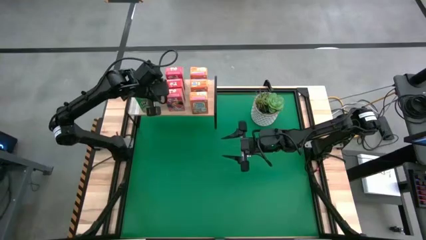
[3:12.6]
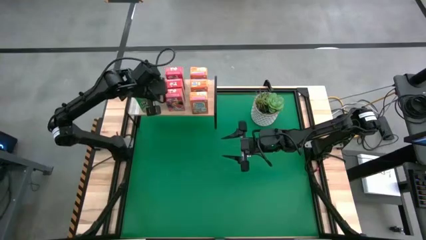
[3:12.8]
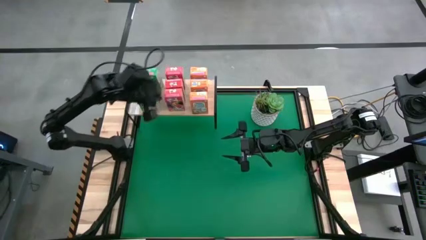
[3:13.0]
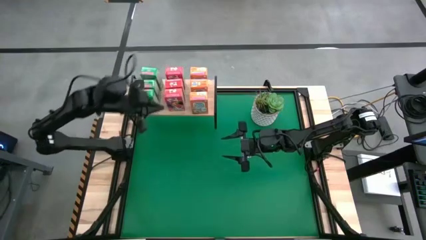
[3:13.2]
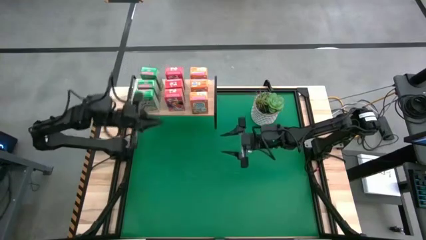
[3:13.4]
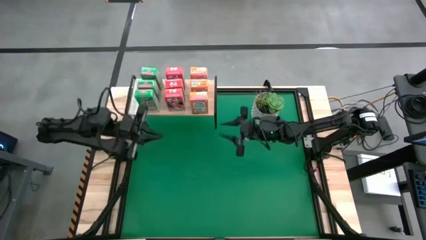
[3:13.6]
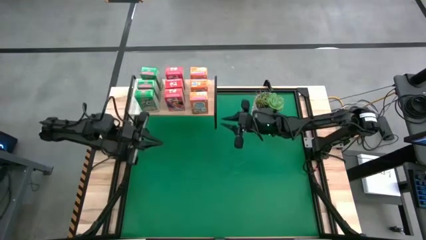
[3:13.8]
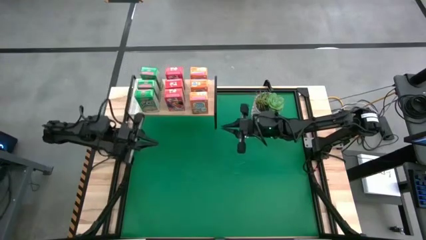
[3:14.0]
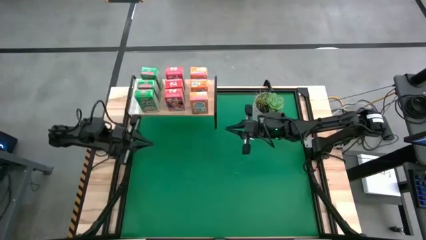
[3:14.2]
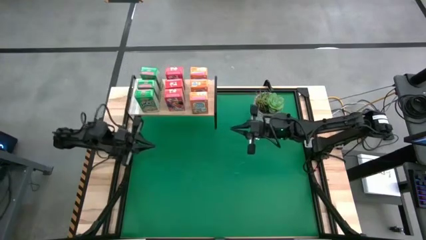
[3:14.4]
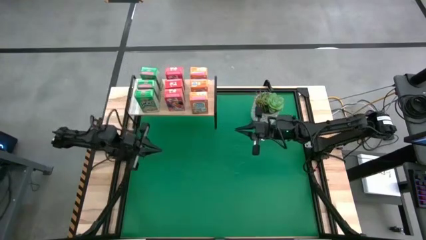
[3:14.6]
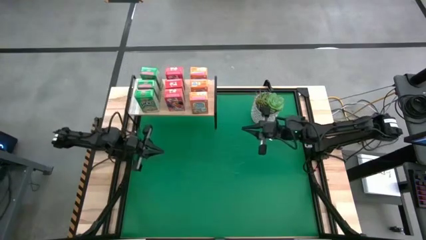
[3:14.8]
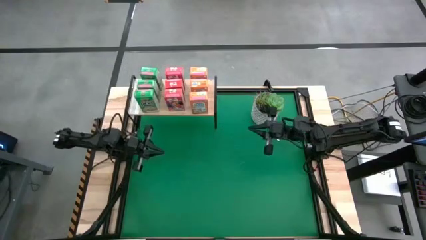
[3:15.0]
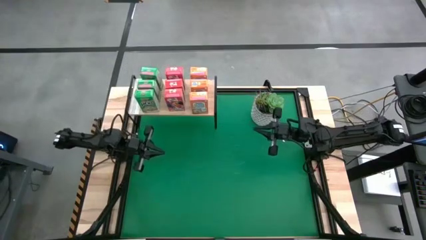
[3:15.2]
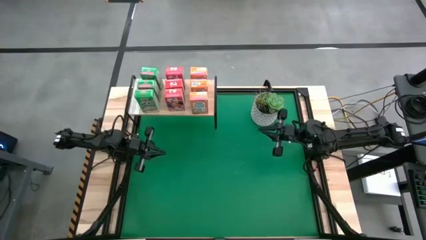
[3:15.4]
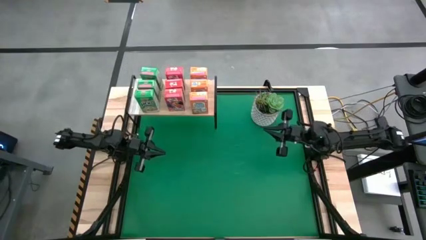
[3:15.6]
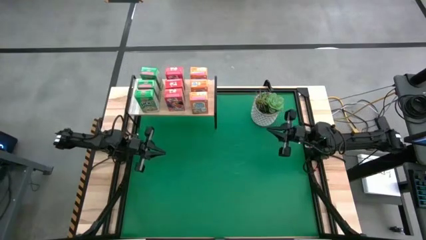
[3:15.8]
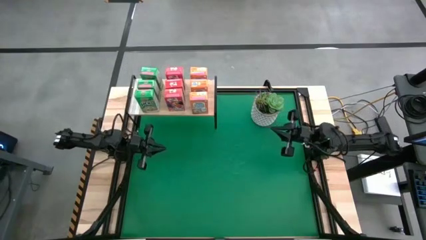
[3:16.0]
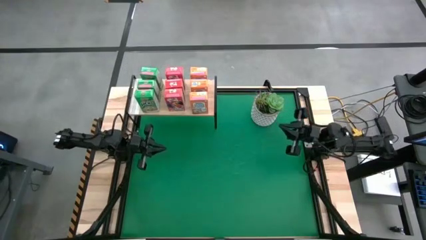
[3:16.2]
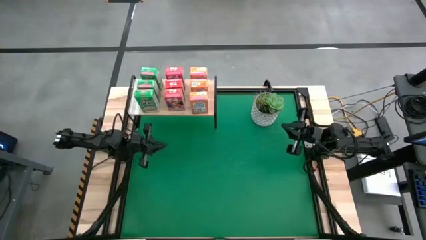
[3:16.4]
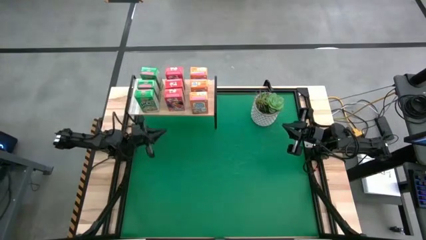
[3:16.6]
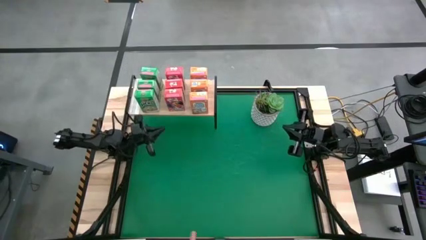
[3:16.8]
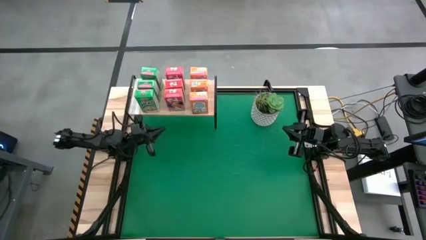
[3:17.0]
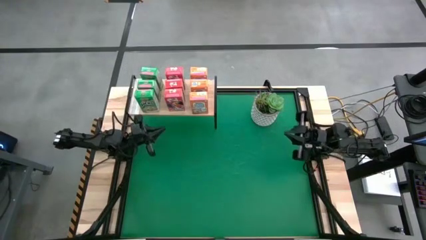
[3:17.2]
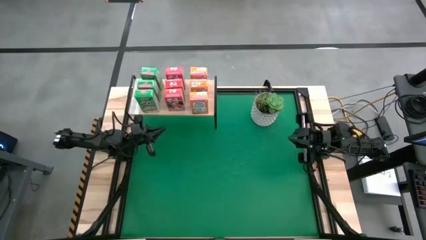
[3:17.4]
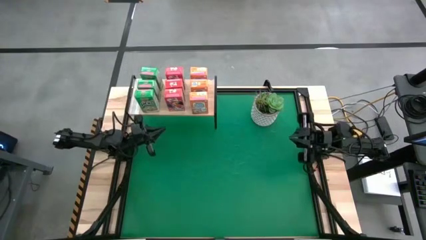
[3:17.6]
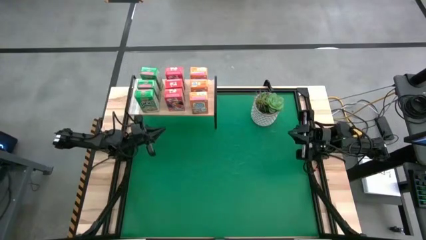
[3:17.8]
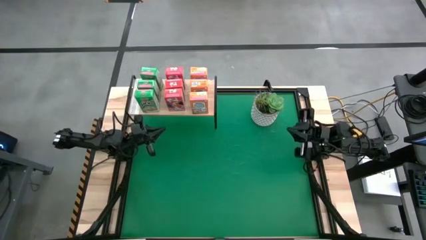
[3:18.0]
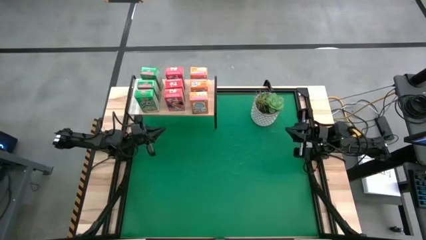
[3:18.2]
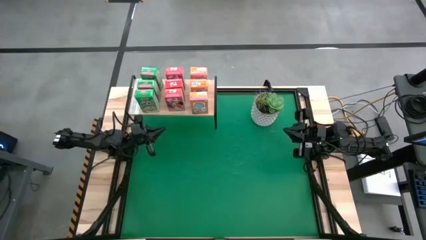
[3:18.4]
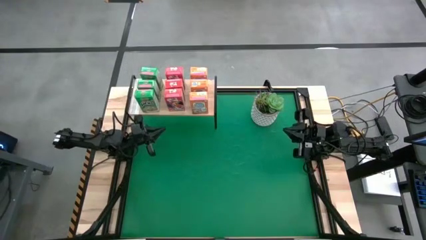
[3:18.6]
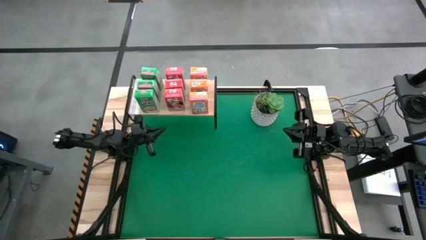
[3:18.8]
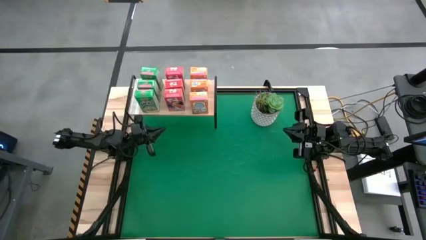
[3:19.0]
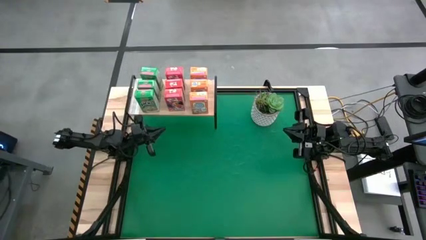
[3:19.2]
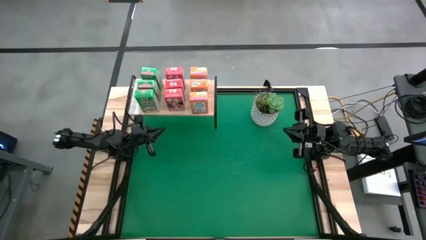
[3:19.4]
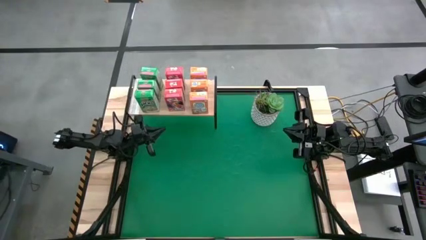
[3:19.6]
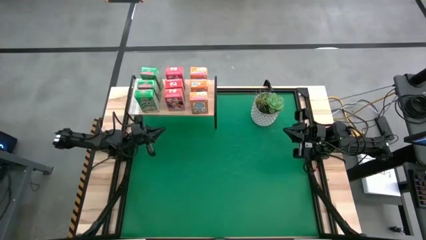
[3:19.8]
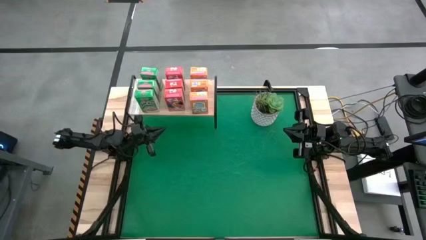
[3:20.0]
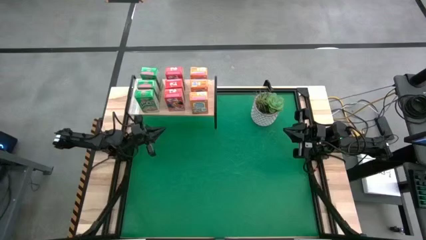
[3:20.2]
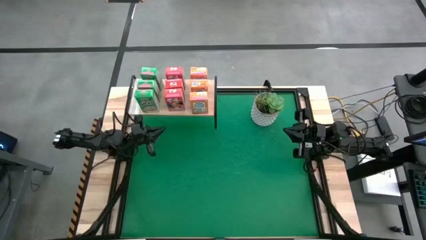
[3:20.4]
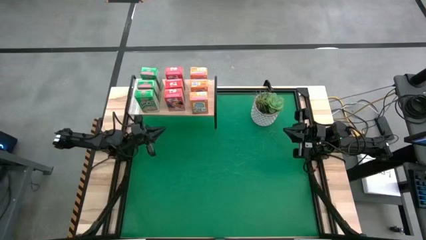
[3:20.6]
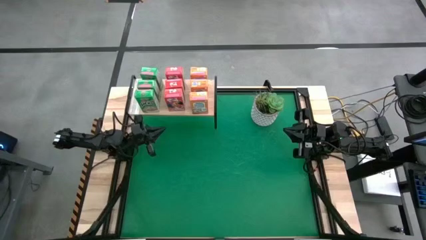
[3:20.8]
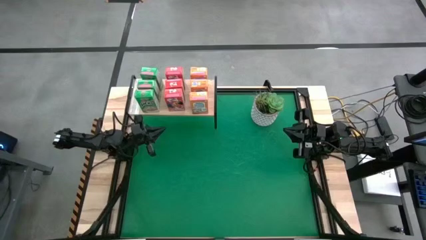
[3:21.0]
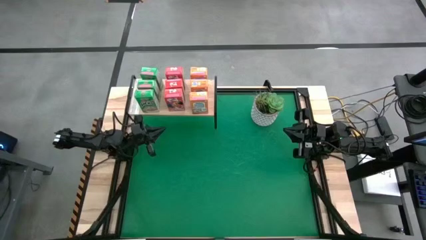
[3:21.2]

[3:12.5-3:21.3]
Task: Stack cereal on shelf
Return to Home Position

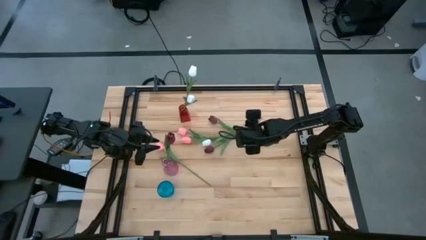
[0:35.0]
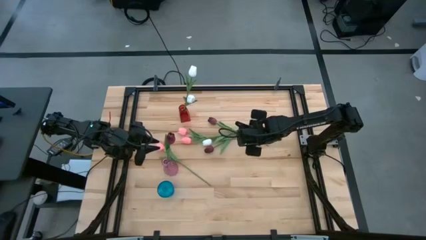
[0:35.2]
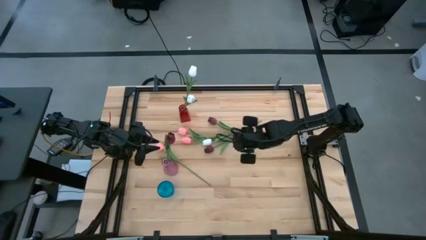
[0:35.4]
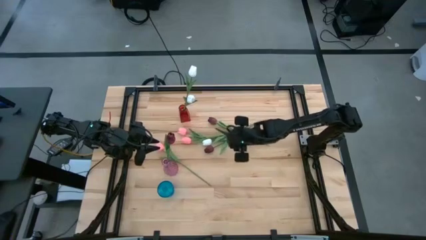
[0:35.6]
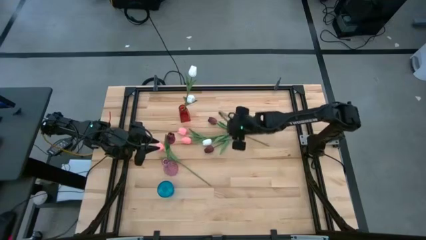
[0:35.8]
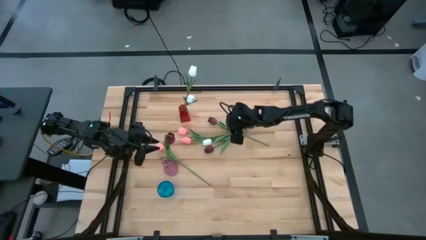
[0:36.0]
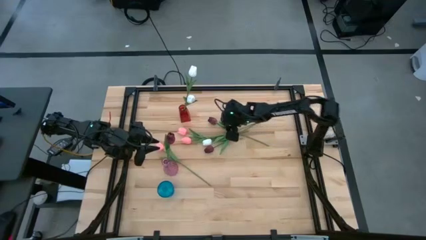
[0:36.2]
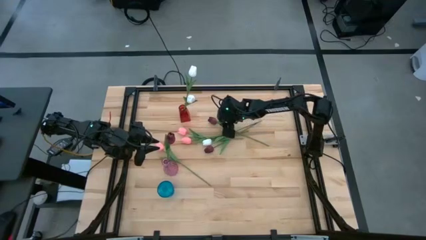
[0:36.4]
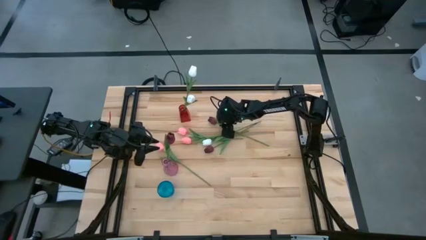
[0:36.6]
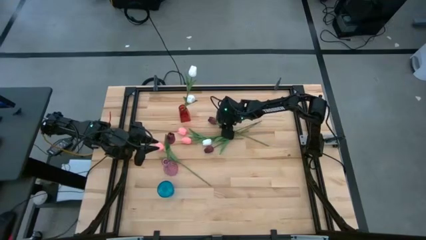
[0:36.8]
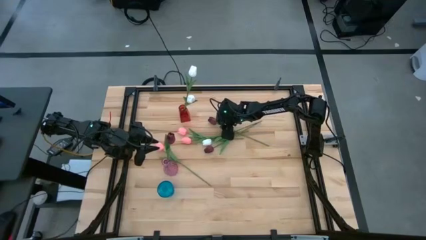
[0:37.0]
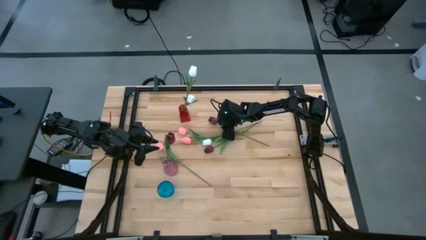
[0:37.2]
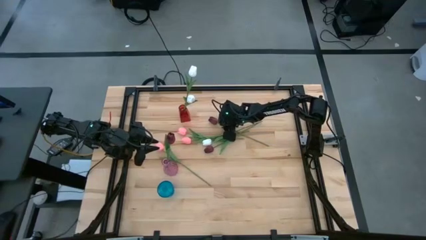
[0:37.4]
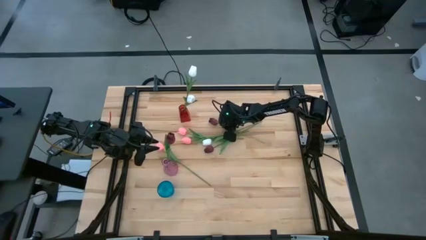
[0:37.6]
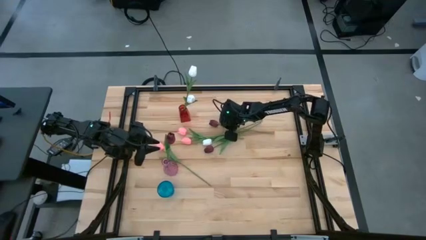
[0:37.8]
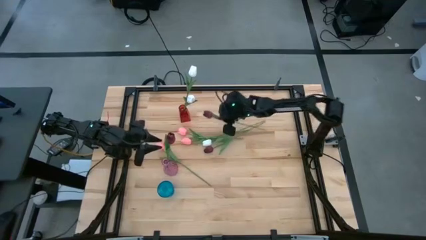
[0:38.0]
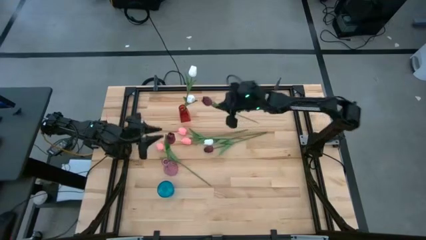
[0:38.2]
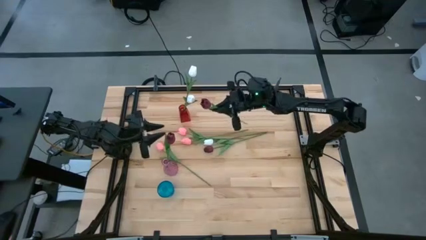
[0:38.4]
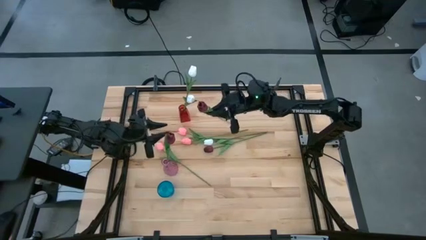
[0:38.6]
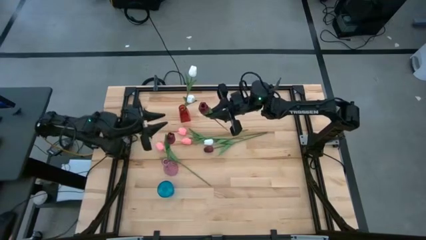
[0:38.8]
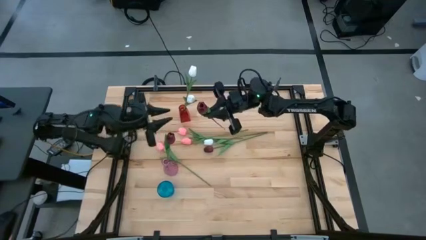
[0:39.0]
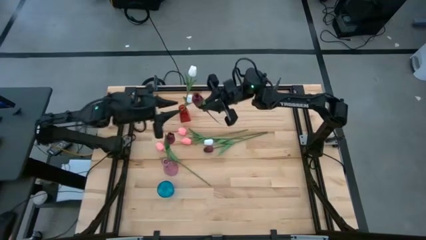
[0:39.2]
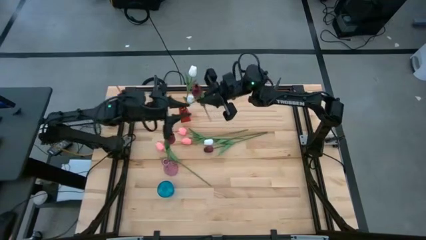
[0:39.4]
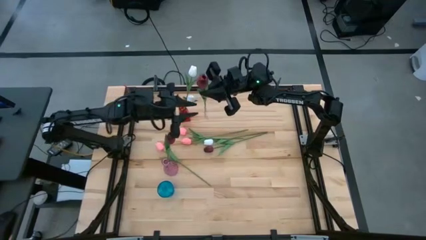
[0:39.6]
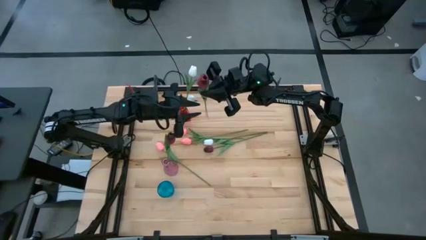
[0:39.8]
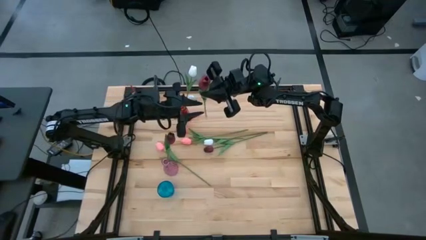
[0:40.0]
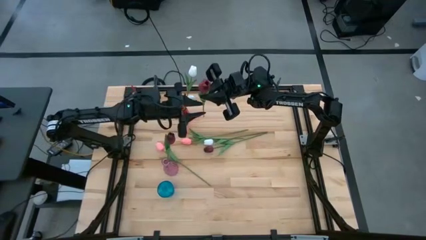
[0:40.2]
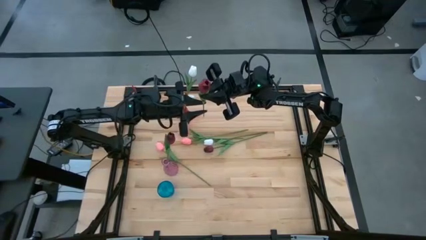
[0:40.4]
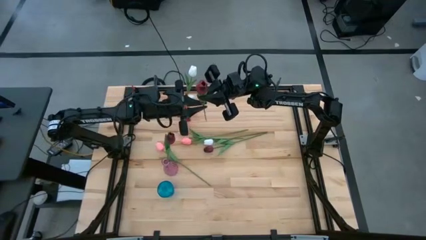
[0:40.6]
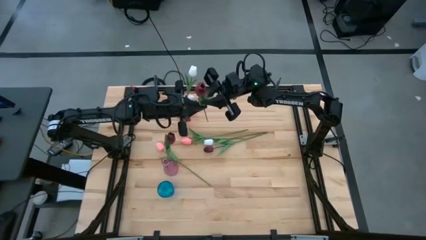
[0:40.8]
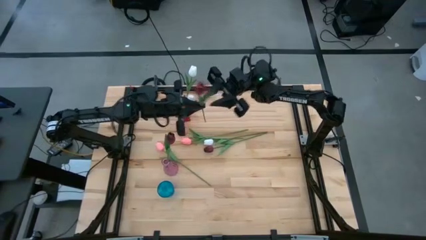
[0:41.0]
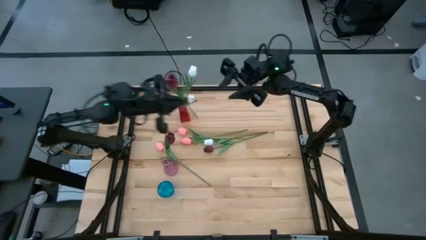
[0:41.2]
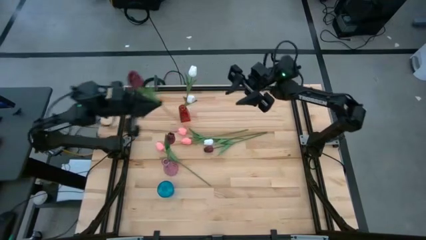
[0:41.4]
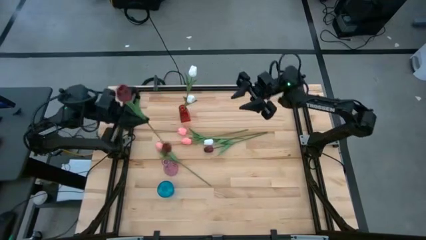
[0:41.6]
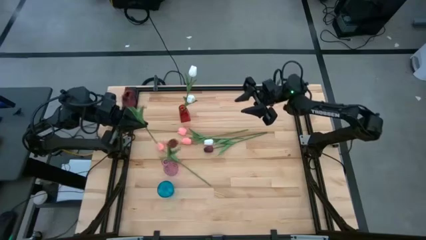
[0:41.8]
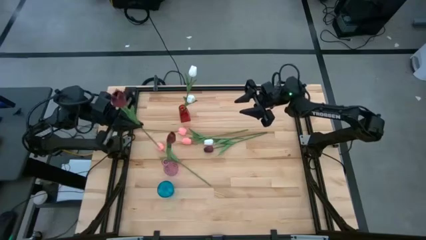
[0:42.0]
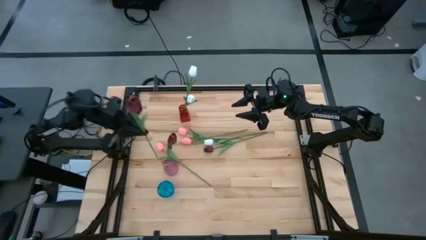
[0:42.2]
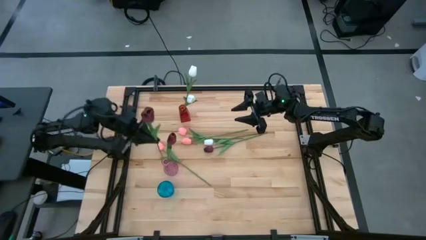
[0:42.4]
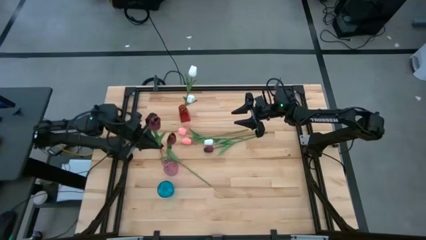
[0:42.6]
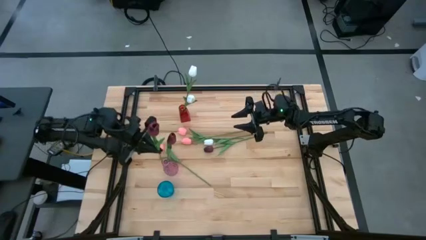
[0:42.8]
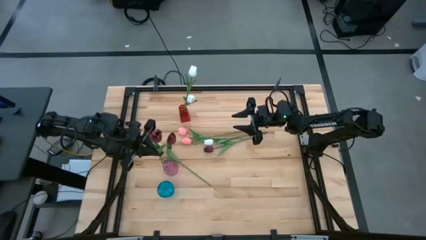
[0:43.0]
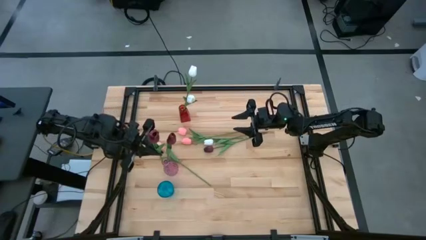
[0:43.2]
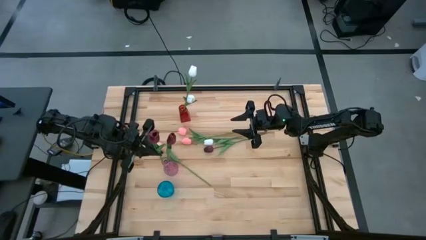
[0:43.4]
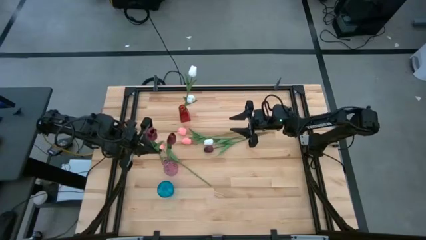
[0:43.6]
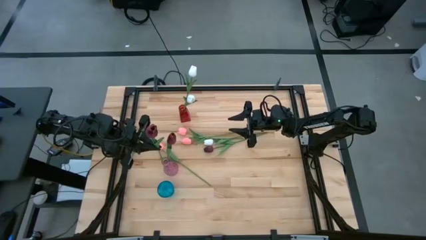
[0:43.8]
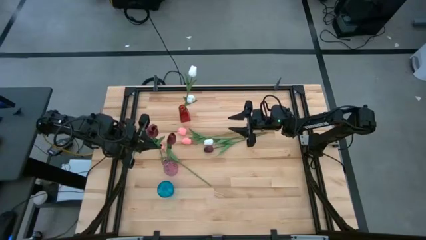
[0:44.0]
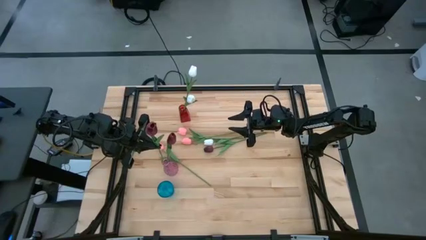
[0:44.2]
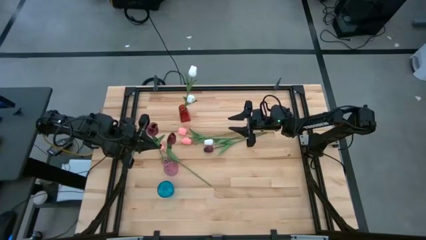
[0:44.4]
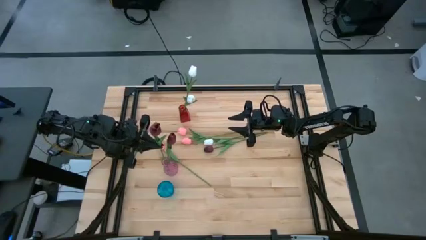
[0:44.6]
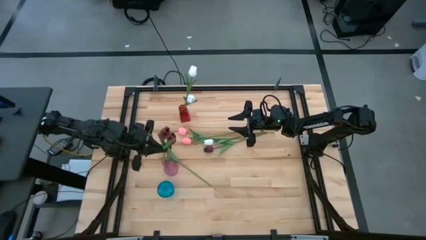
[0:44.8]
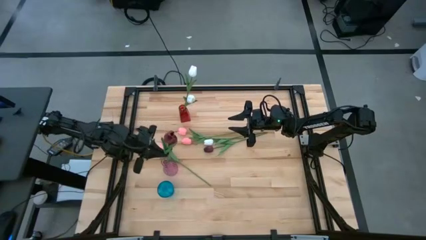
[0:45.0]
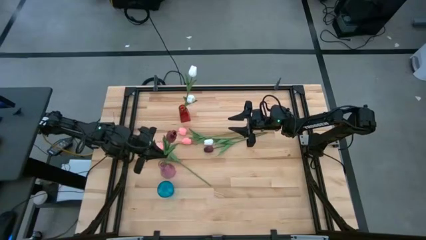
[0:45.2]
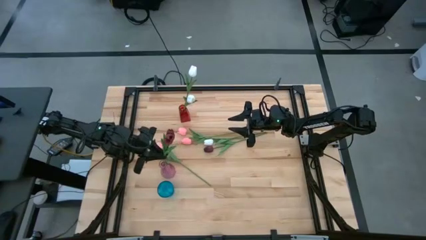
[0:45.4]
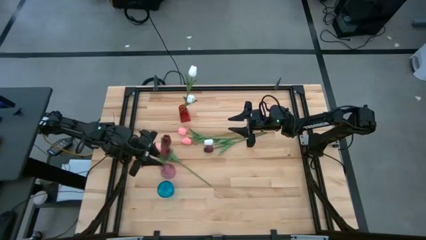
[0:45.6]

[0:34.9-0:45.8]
Task: Sort flowers into vase by color
Put the top dark red tulip into the pink vase
